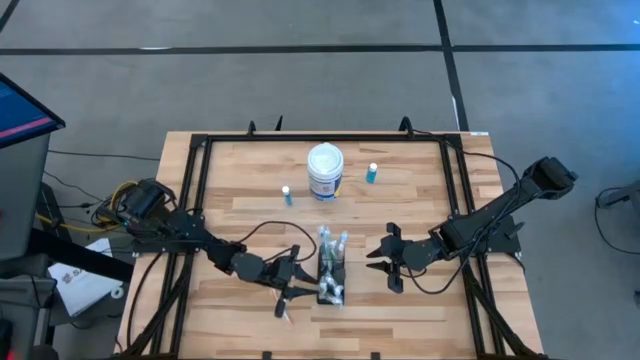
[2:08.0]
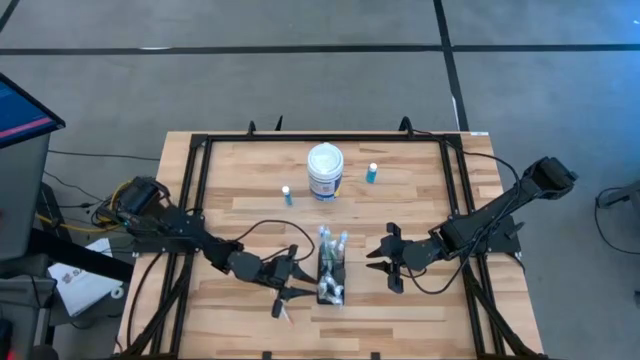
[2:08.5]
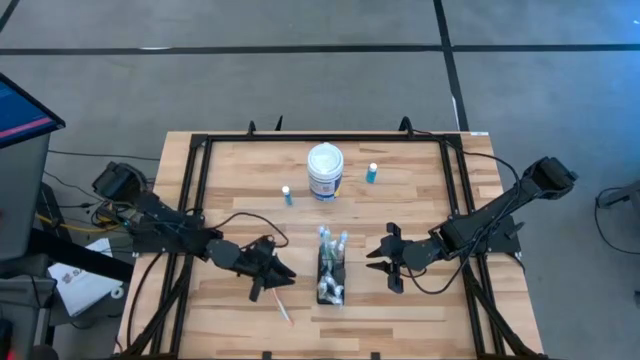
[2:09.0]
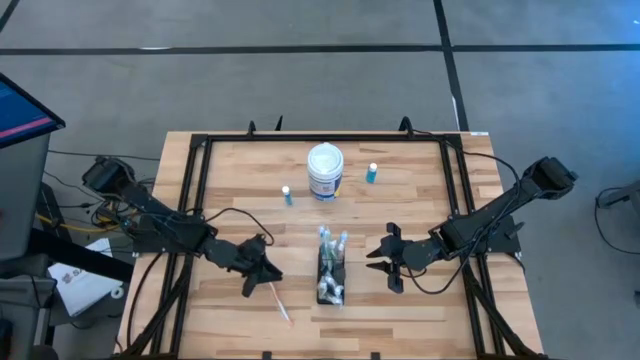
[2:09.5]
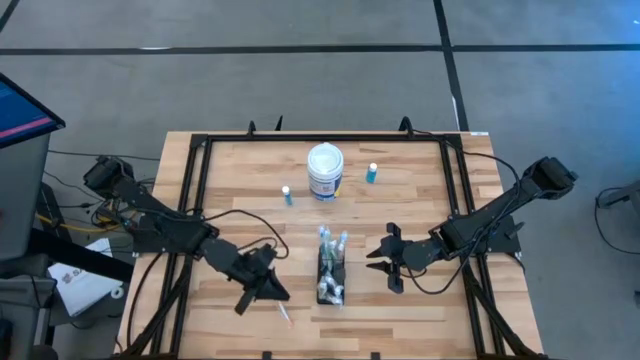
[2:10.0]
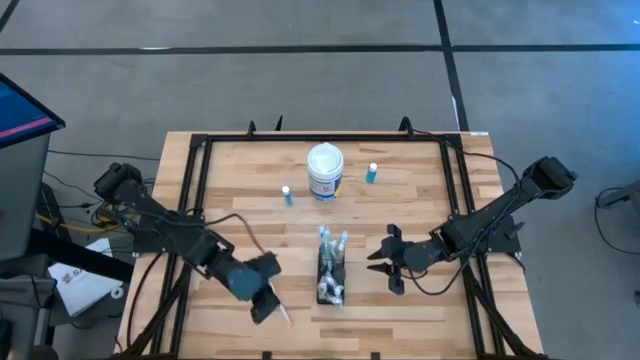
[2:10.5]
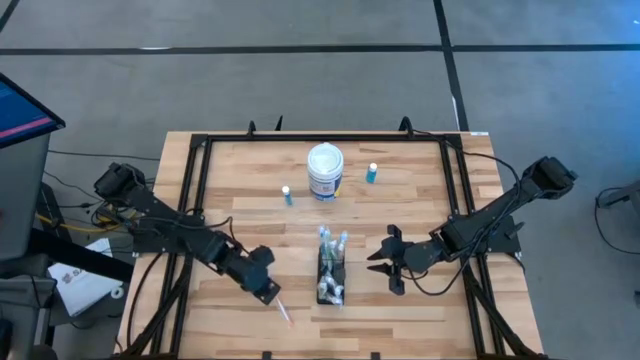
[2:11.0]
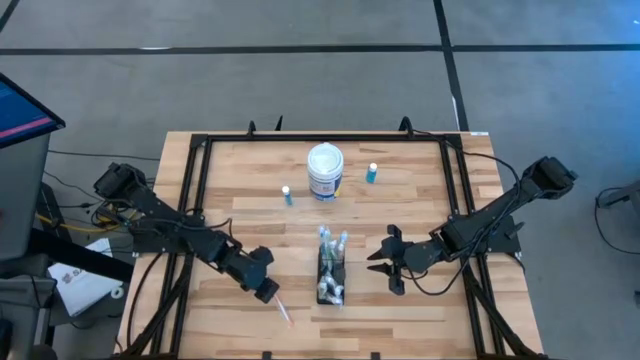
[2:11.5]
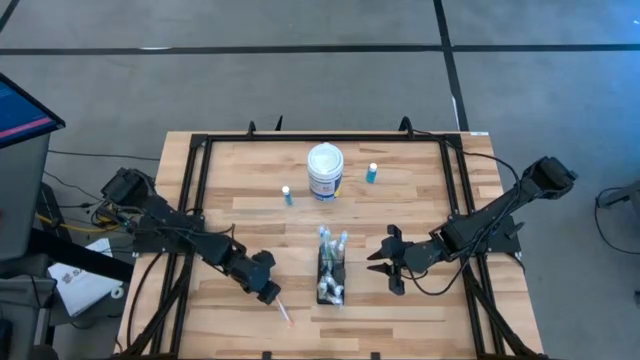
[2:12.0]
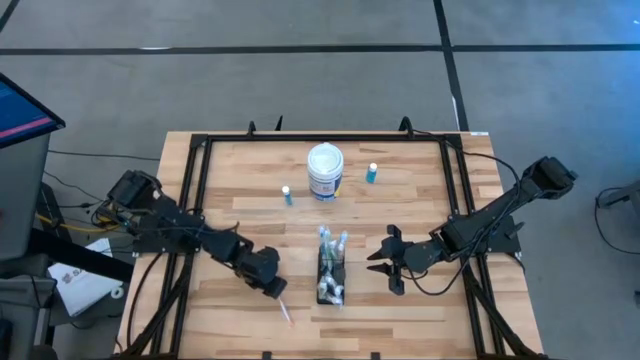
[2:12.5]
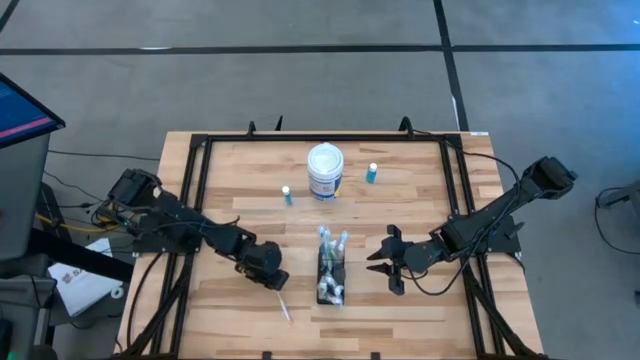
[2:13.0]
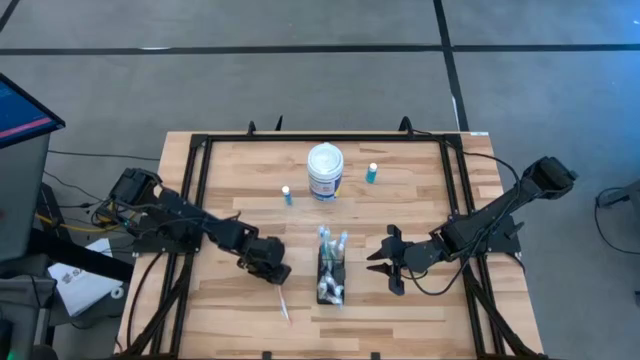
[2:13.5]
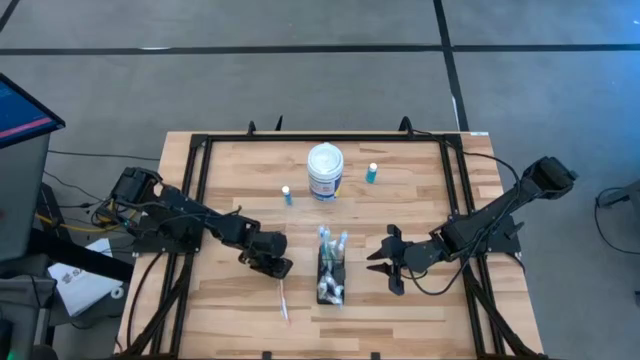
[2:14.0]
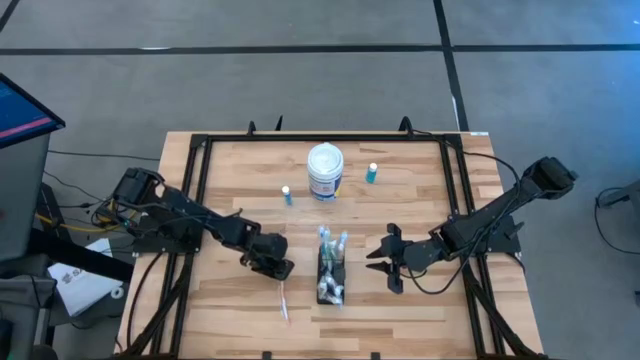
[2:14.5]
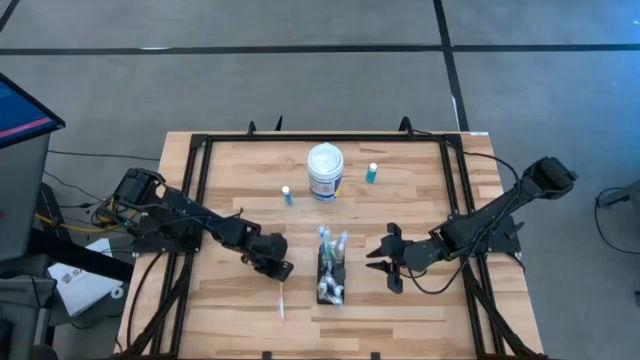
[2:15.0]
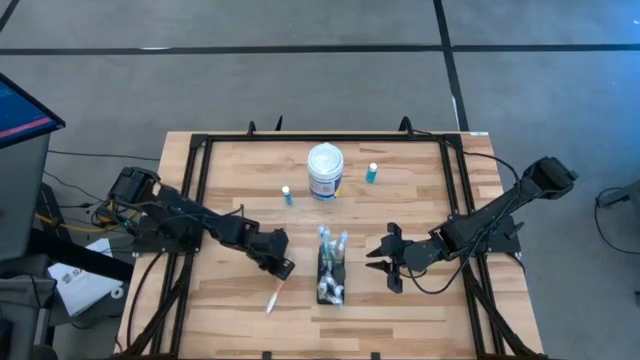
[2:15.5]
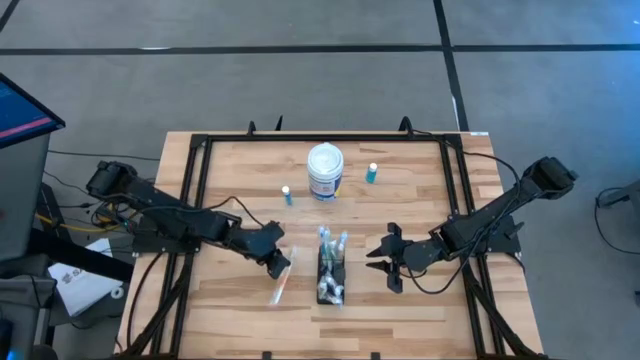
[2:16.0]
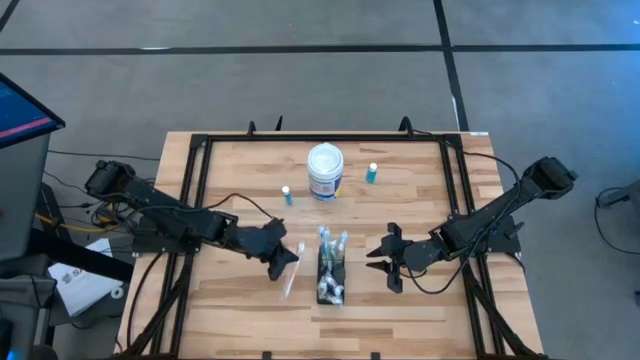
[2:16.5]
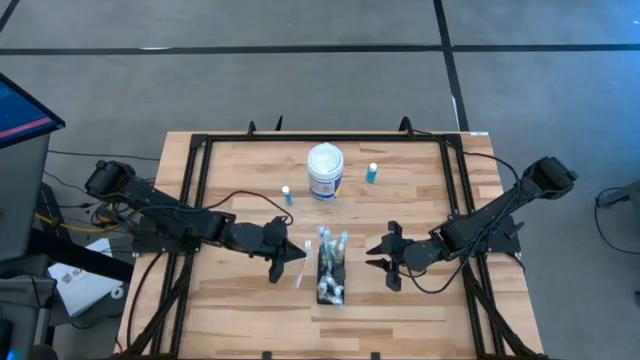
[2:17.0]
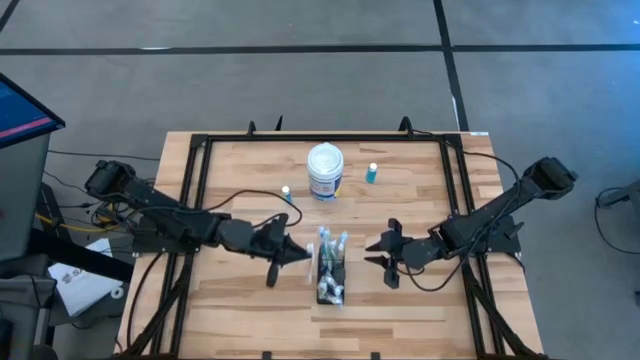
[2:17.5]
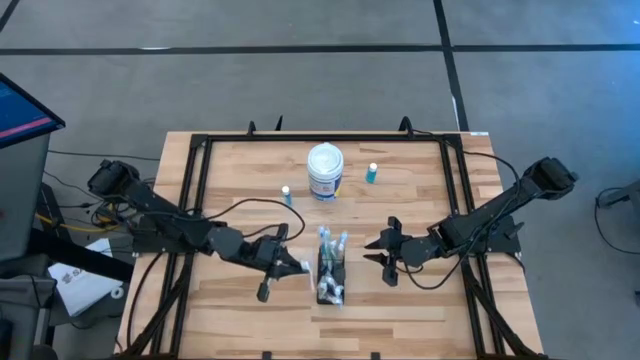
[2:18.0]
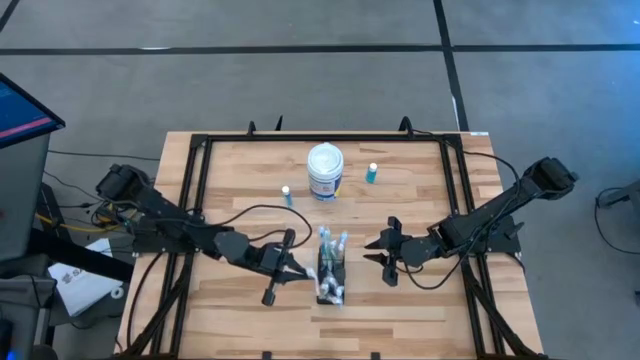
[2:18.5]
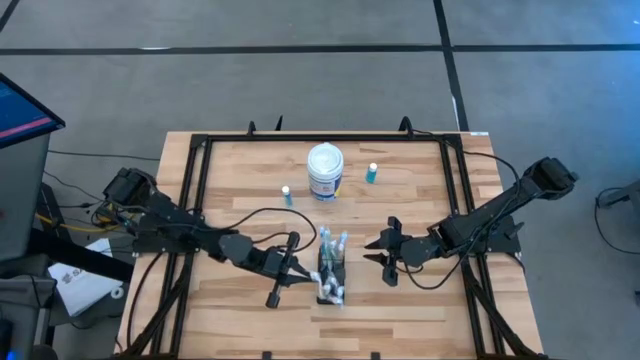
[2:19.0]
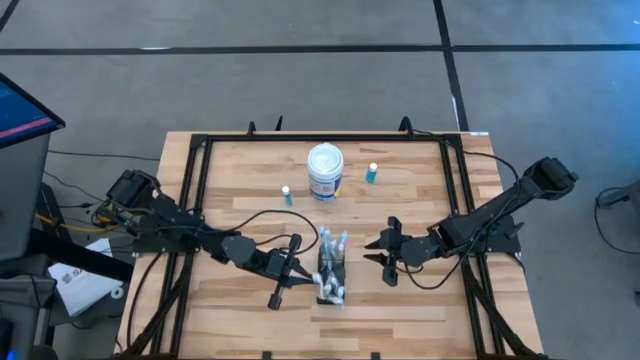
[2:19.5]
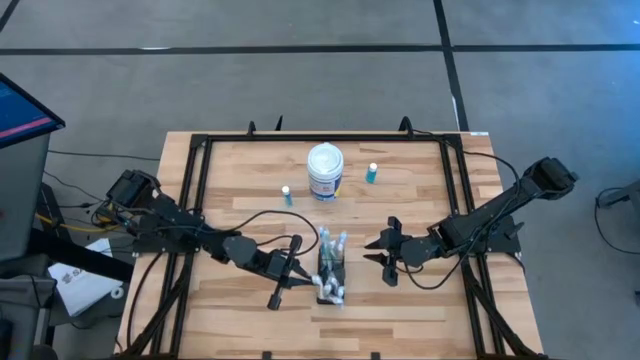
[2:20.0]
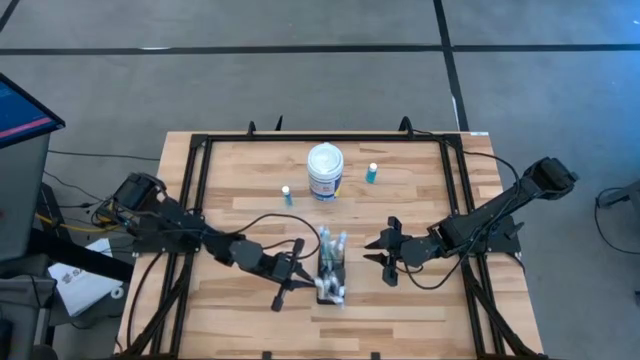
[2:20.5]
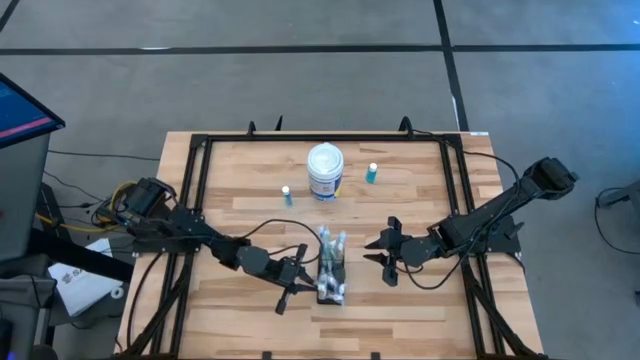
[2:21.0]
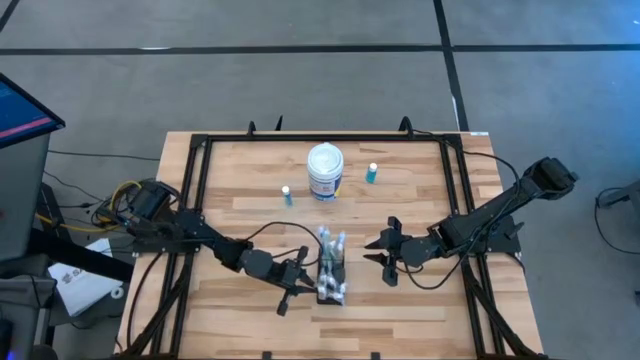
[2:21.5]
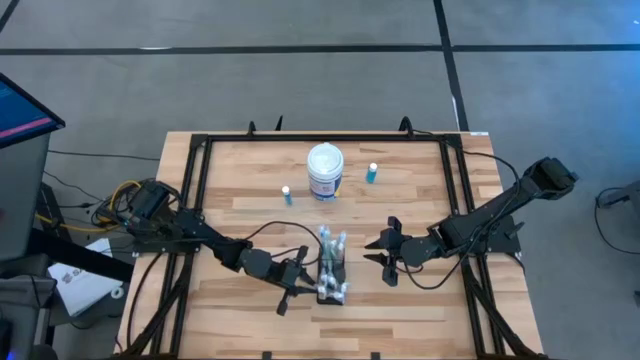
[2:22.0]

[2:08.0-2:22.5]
Task: Pick & Place toothbrushing station
Put the orange toothbrush into the black mesh organizer

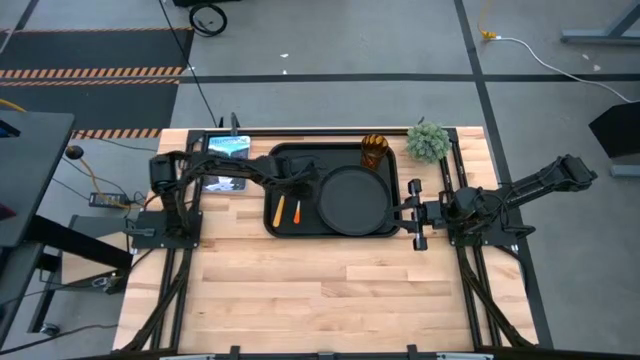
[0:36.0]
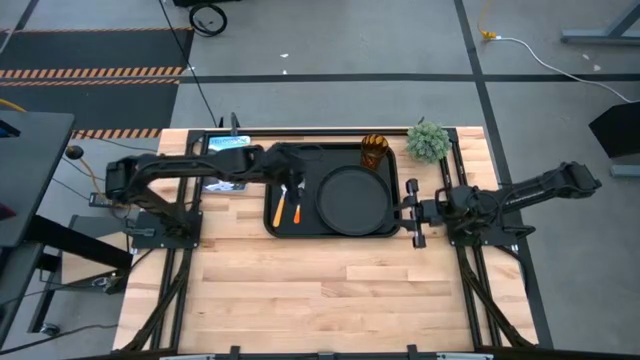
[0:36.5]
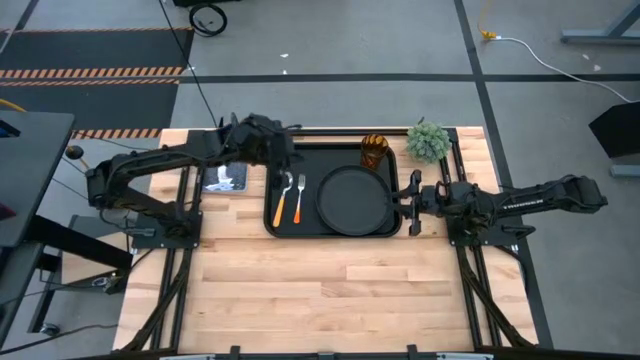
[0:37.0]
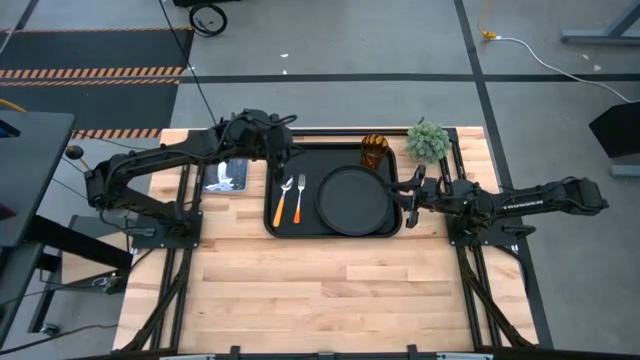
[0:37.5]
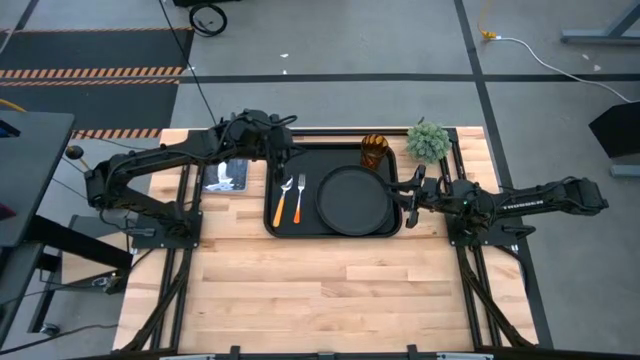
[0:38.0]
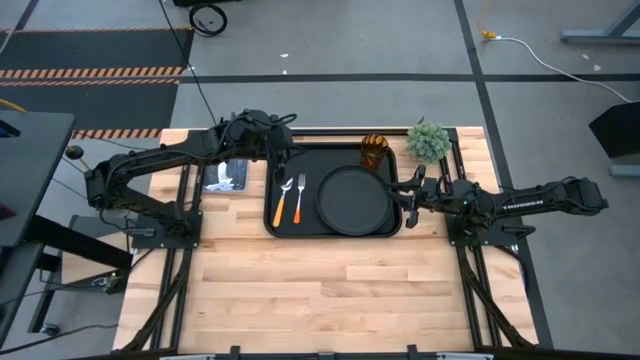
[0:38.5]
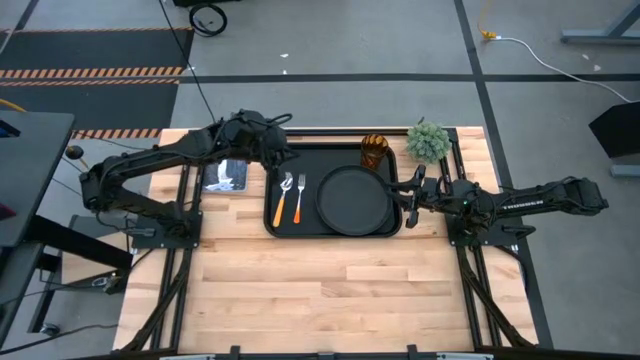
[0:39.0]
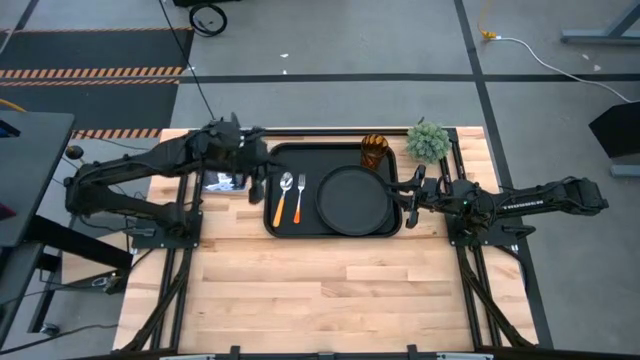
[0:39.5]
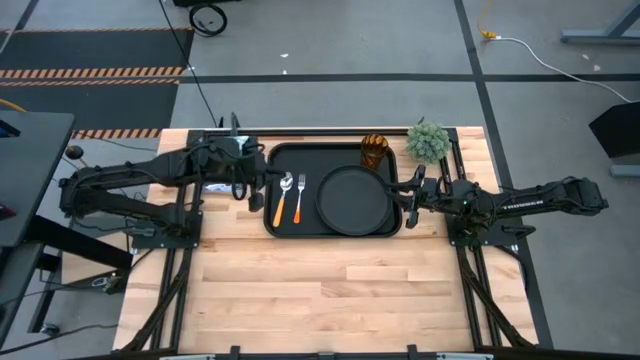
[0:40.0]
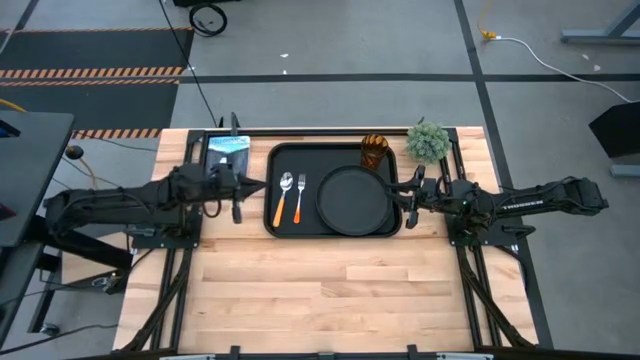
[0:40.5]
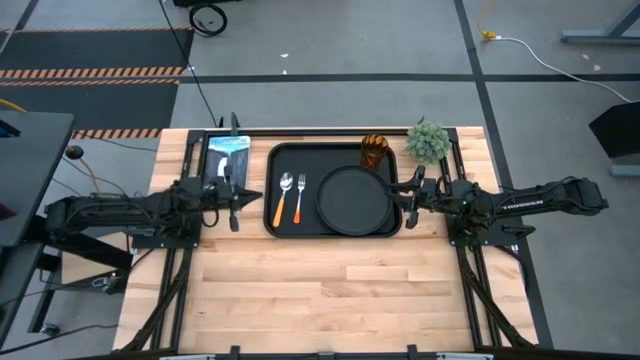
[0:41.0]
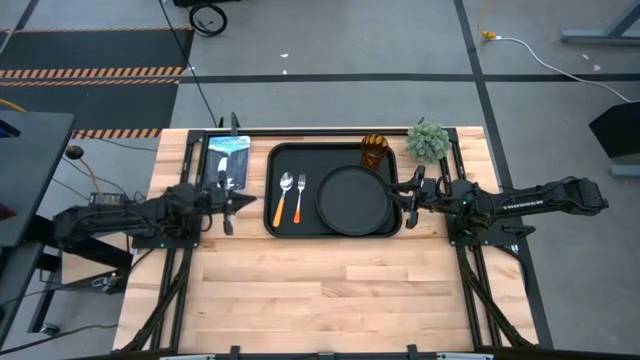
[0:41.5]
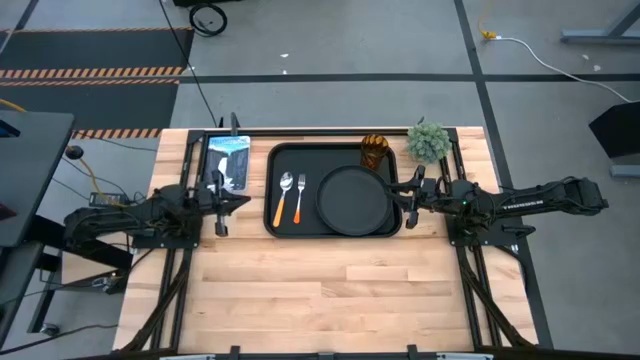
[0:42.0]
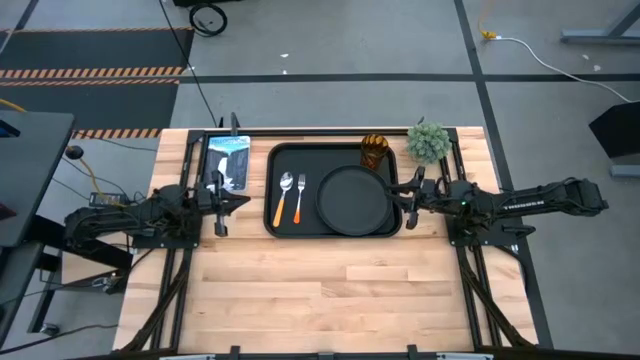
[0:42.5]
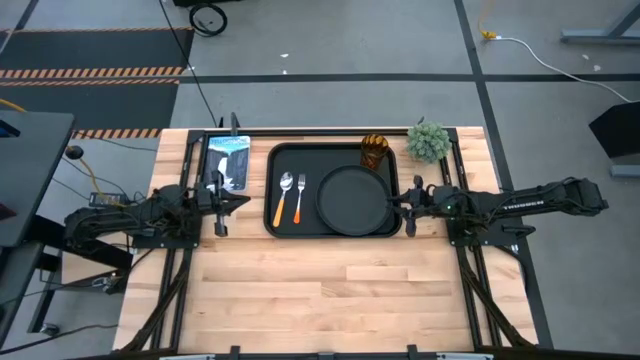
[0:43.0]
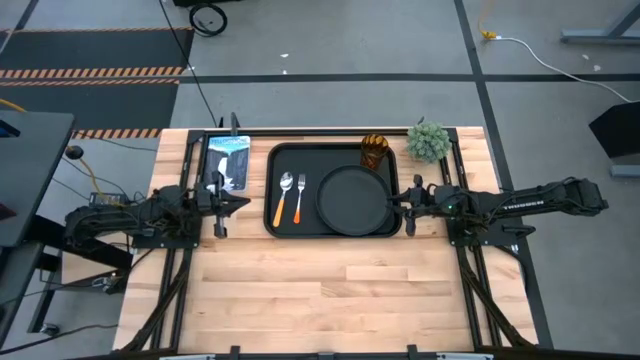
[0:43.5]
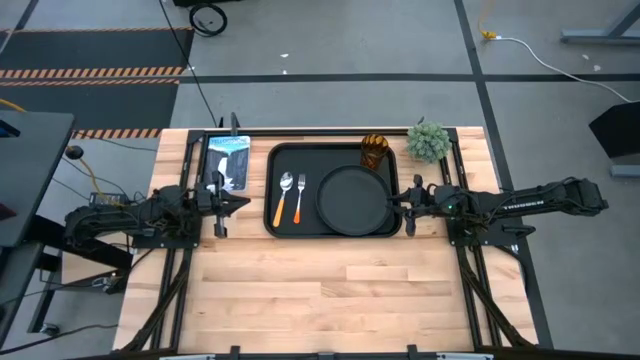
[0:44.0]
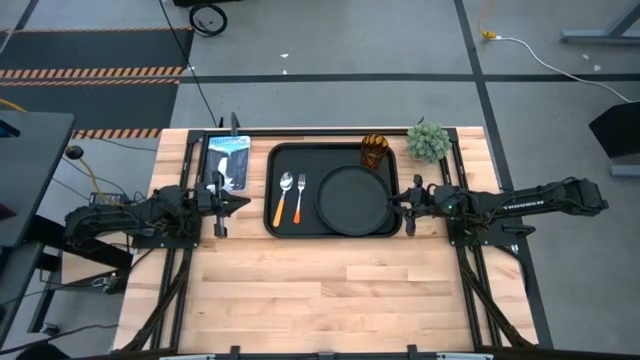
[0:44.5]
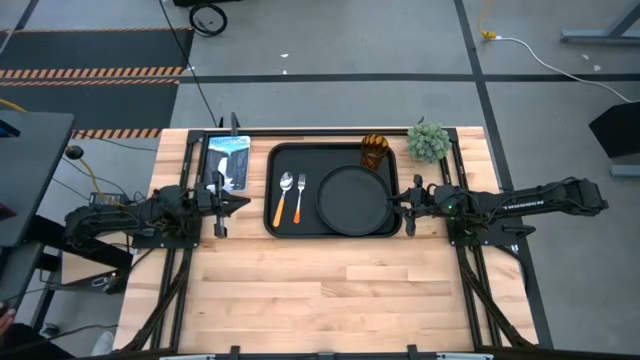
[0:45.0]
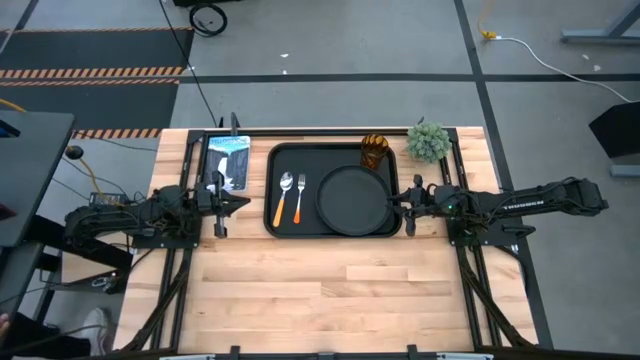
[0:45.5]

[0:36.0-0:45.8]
Task: Pick and place plate/cup/fork/spoon on tray
Return to Home Position
